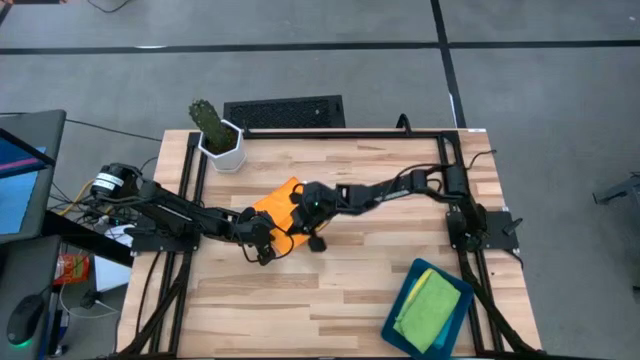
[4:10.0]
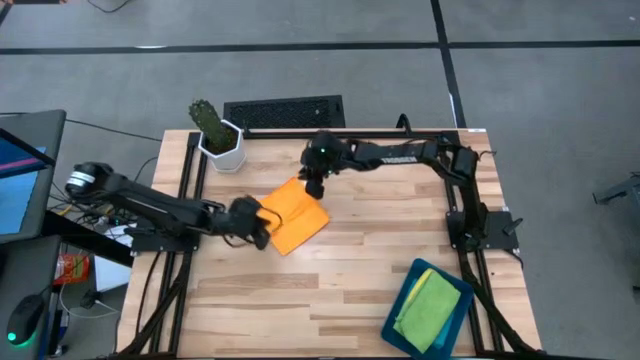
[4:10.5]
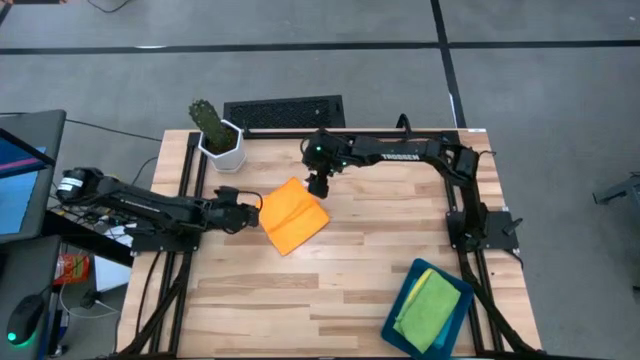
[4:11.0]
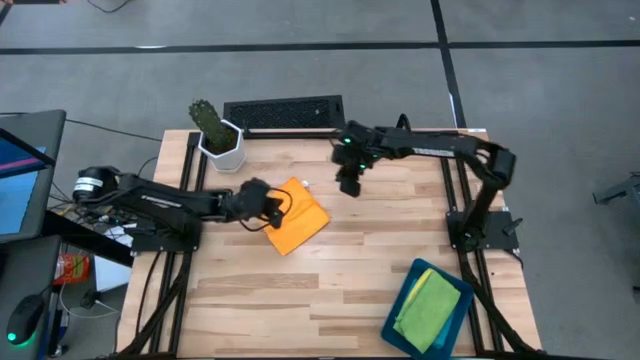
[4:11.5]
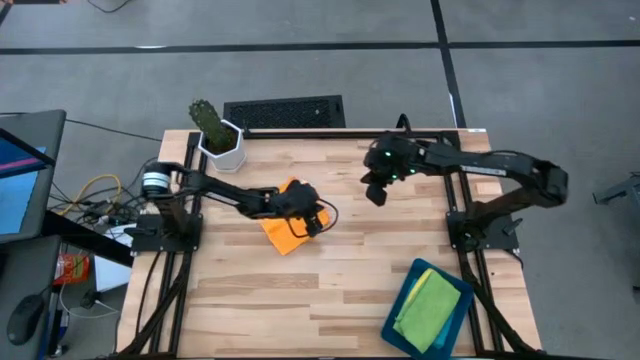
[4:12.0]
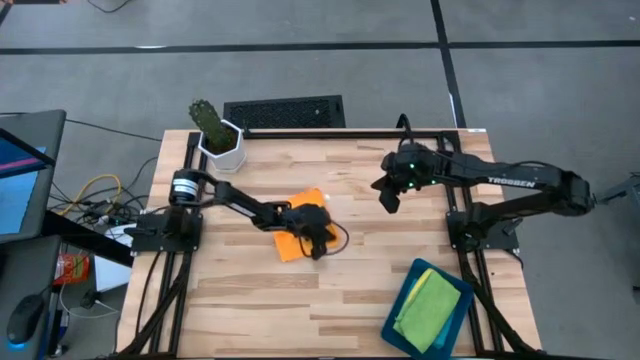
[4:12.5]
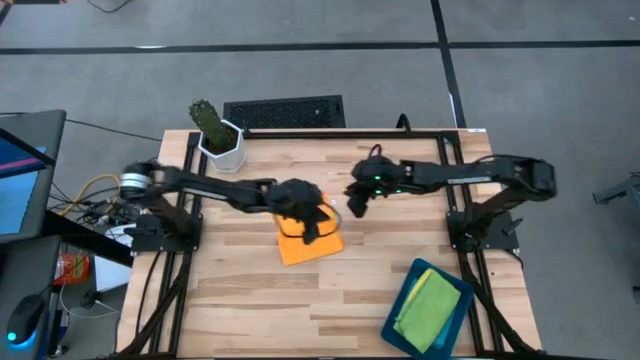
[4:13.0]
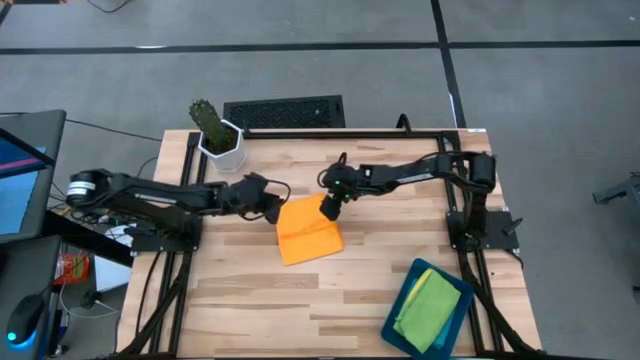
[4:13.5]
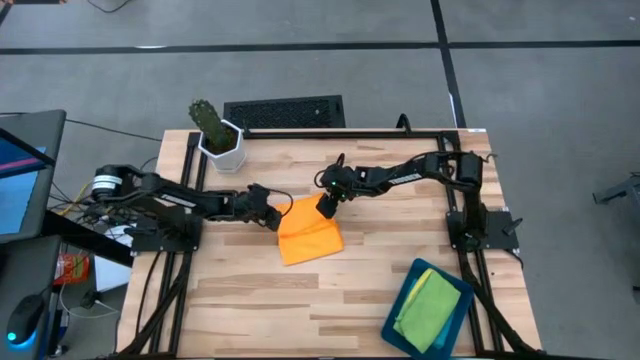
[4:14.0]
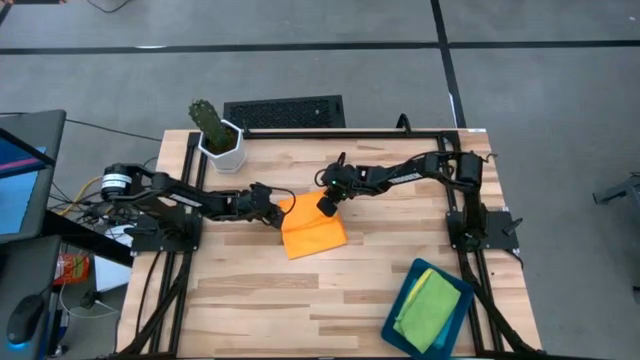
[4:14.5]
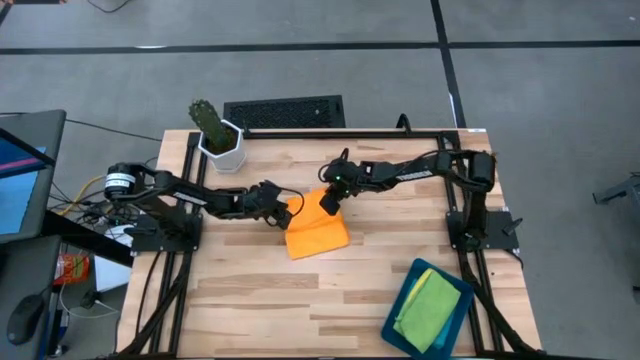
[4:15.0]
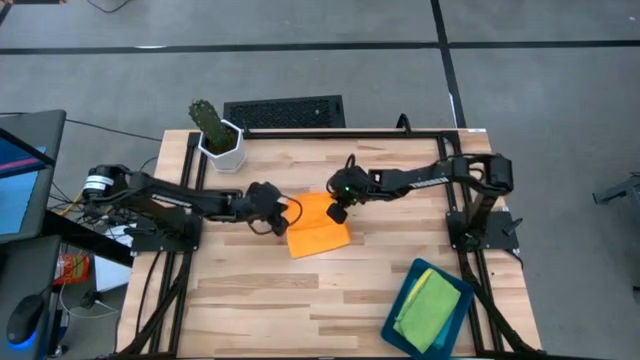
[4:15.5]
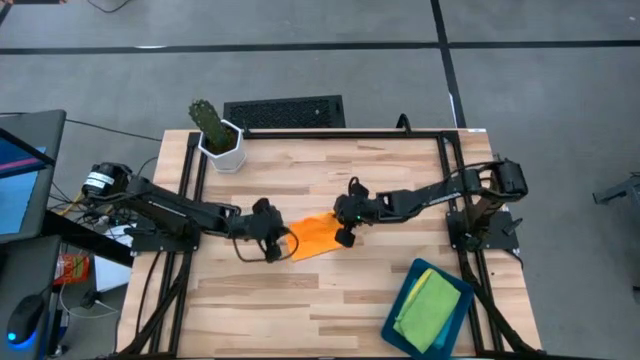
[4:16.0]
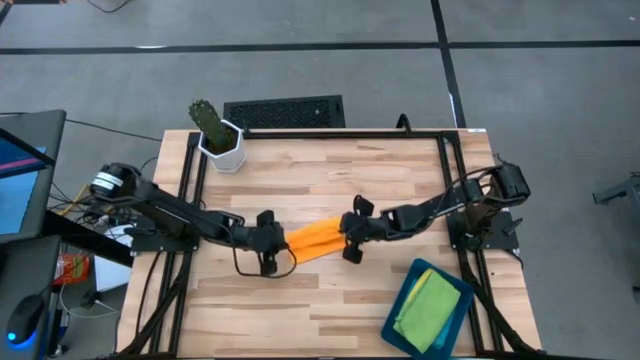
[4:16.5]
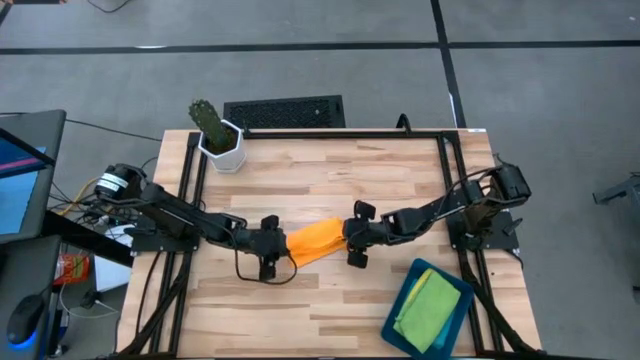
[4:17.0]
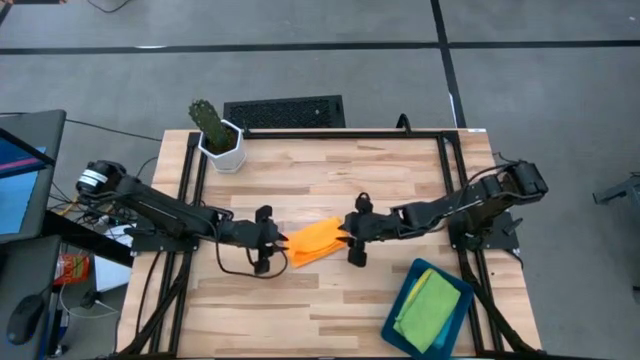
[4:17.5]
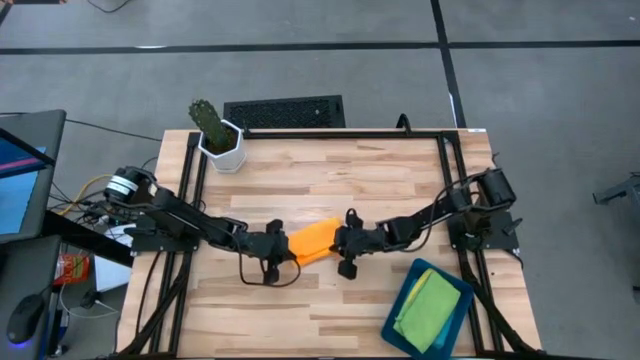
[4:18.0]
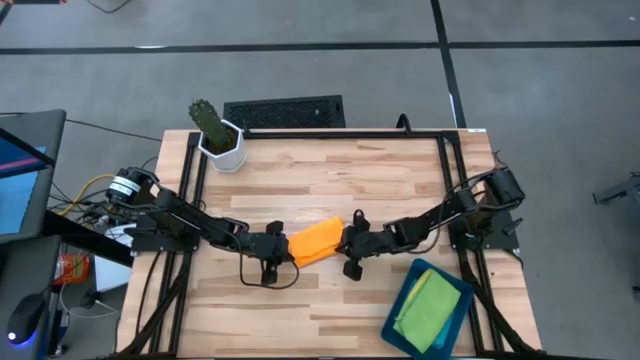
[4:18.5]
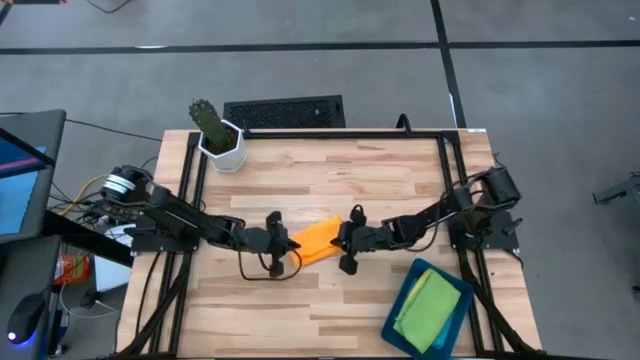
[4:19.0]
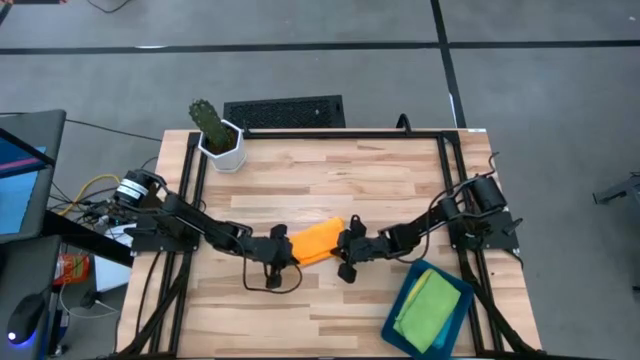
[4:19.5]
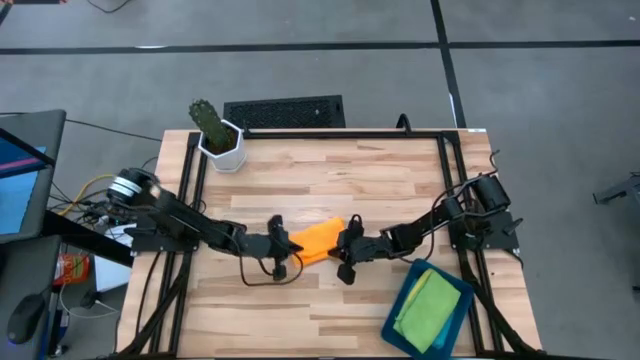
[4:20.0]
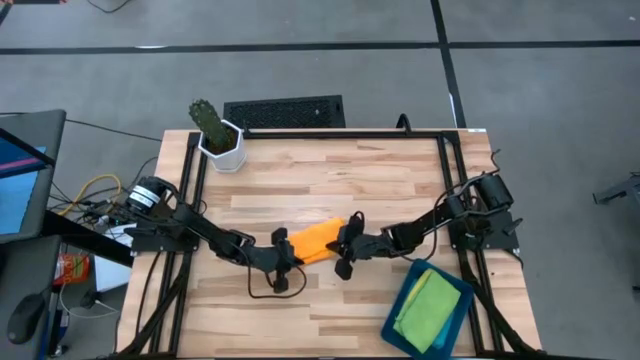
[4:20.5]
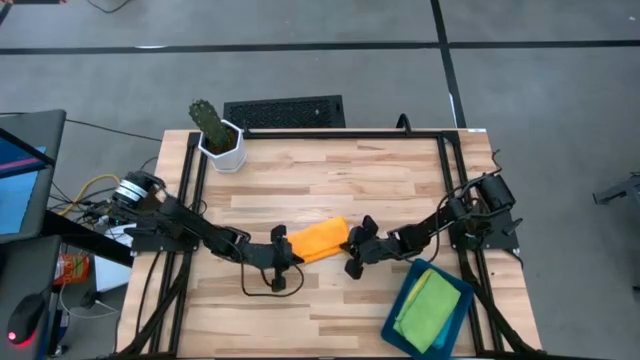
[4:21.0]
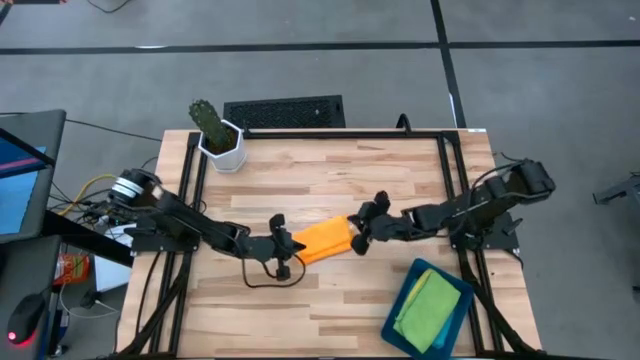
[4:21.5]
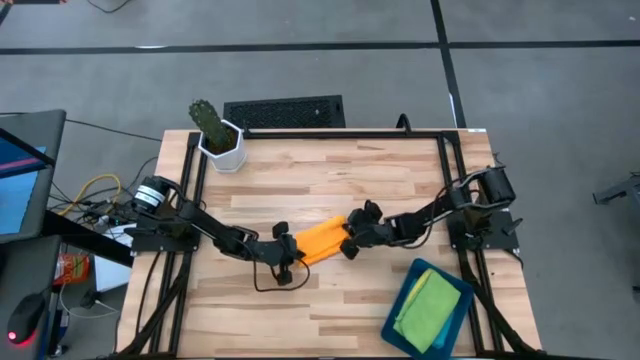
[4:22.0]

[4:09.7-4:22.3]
Task: Fold microfiber towels
Fold the orange microfiber towel

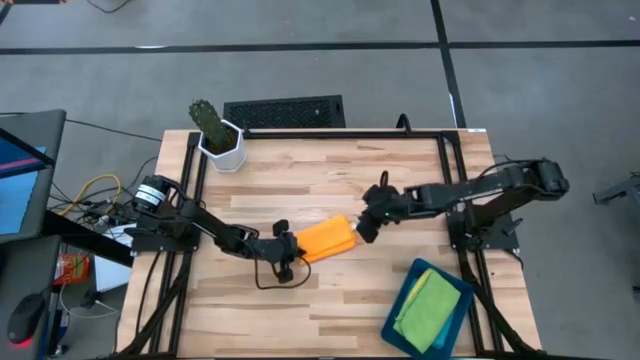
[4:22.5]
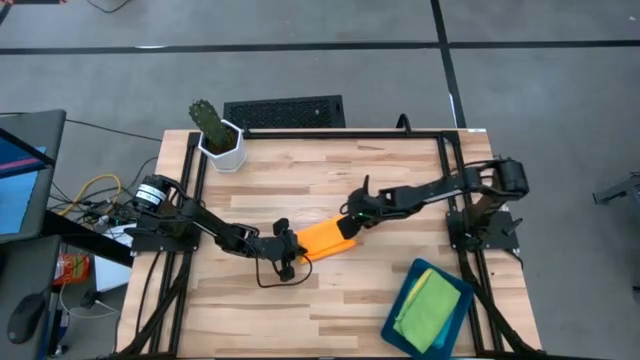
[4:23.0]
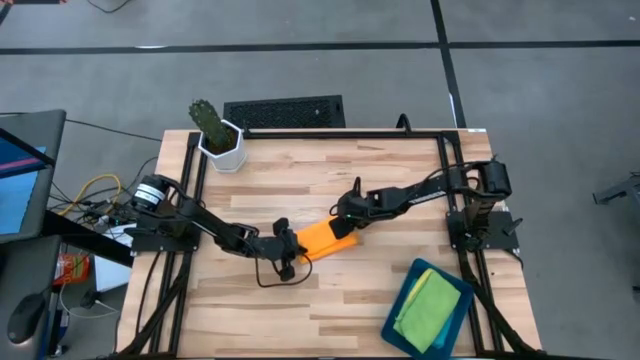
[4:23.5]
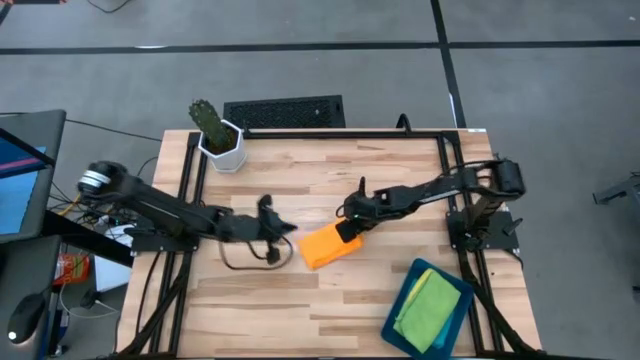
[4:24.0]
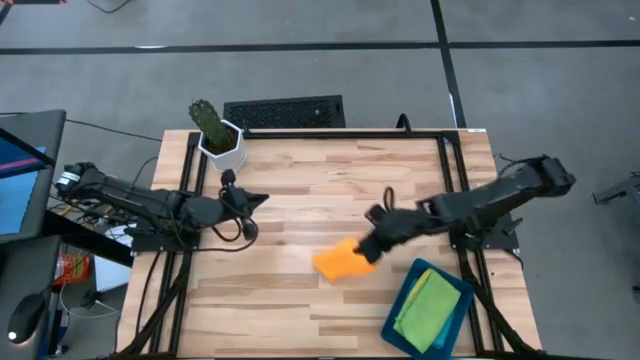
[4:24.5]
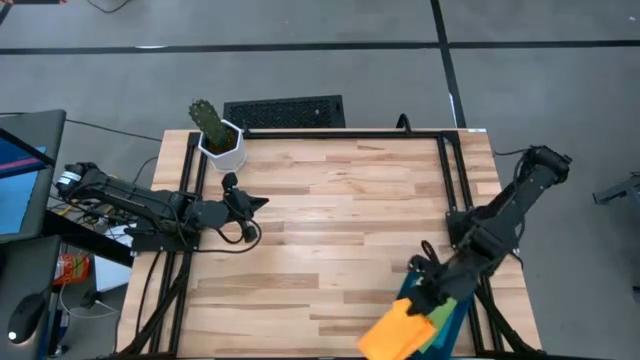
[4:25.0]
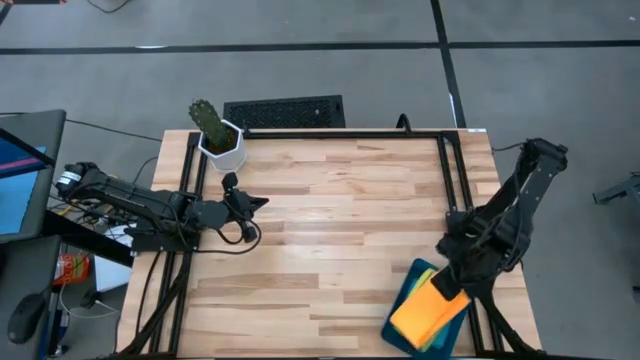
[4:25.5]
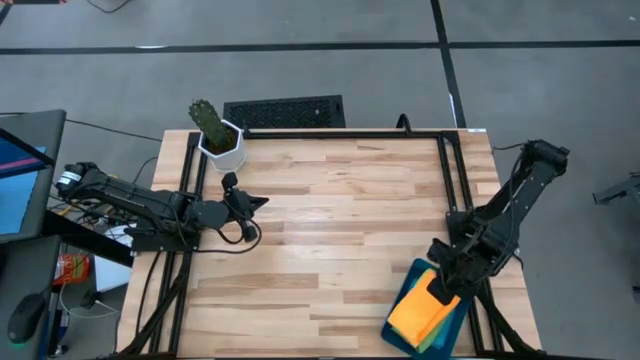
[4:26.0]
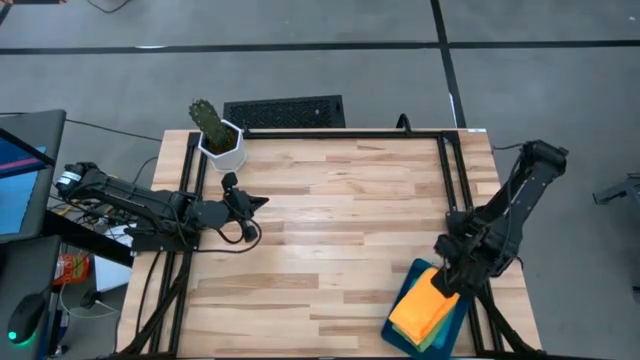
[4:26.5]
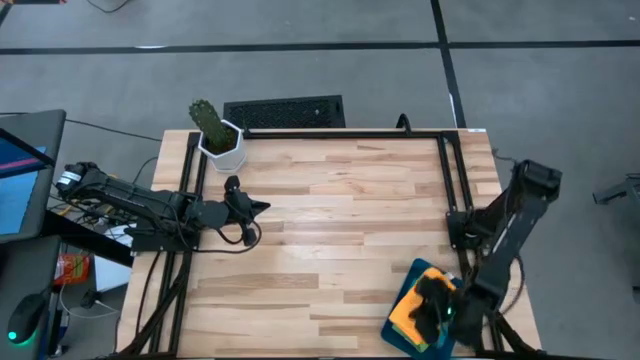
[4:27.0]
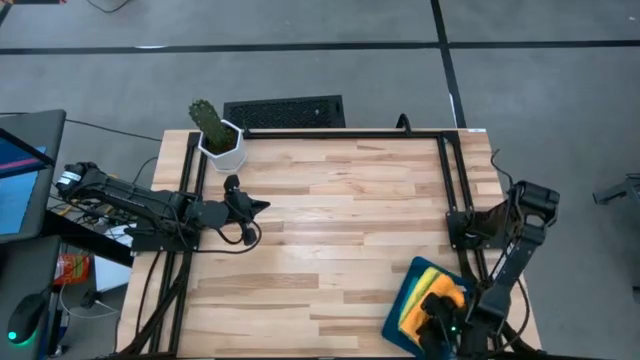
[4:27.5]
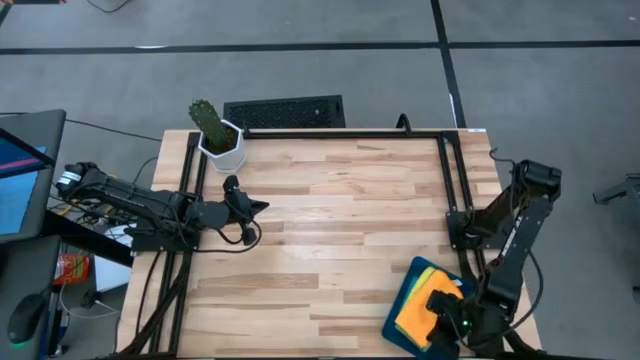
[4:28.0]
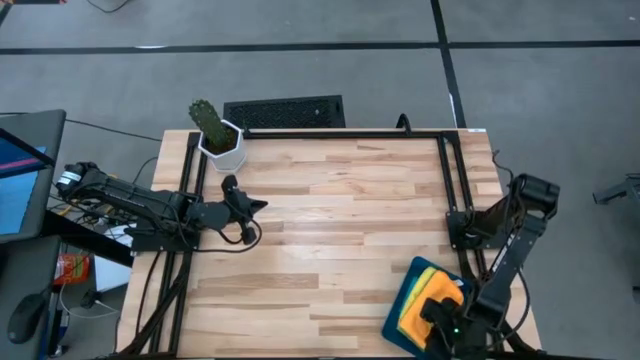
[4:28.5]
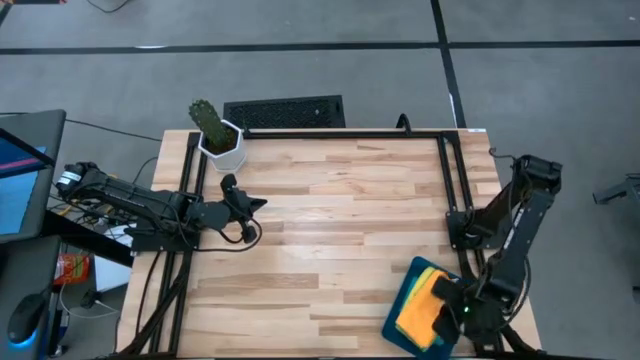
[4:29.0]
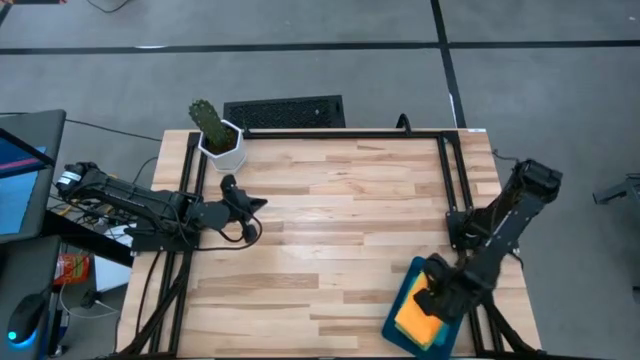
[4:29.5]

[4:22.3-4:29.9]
Put the folded orange microfiber towel into the blue bin

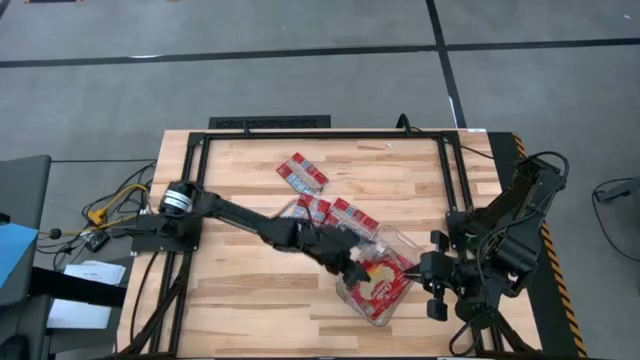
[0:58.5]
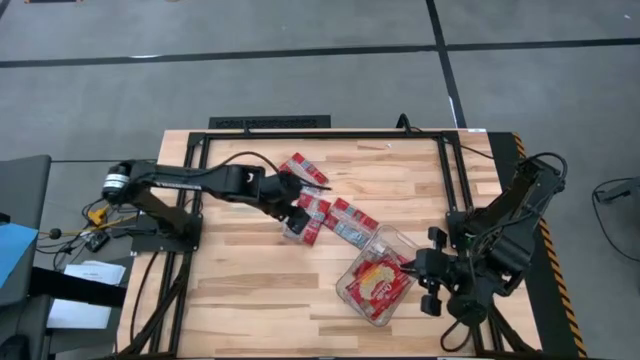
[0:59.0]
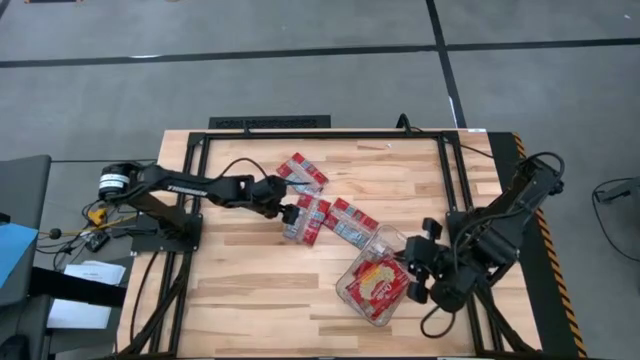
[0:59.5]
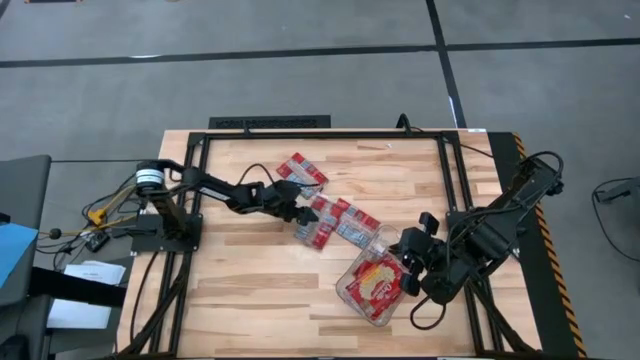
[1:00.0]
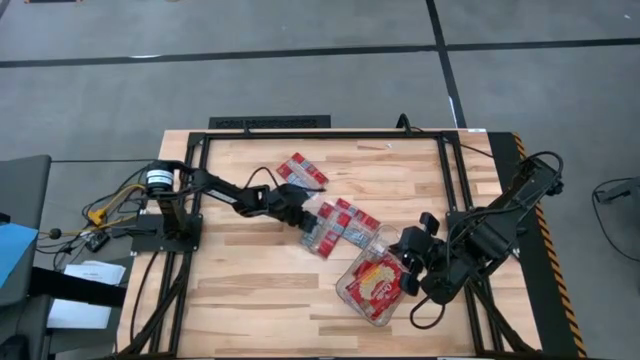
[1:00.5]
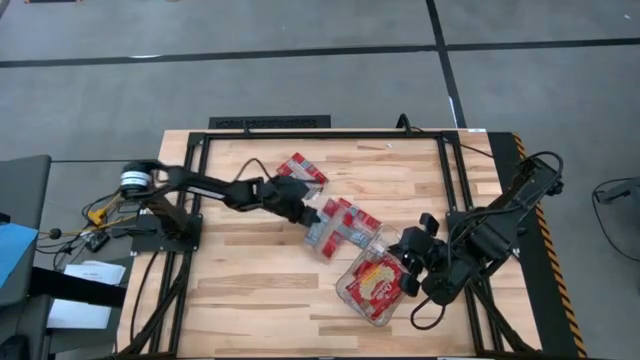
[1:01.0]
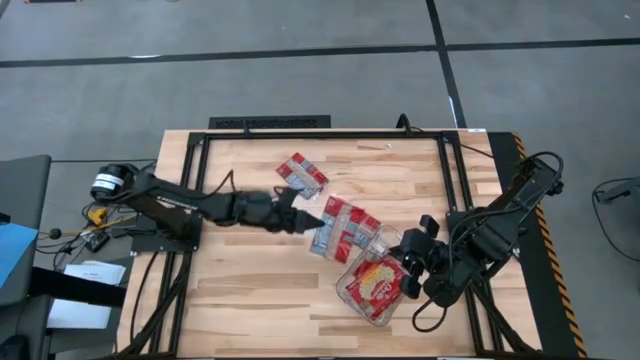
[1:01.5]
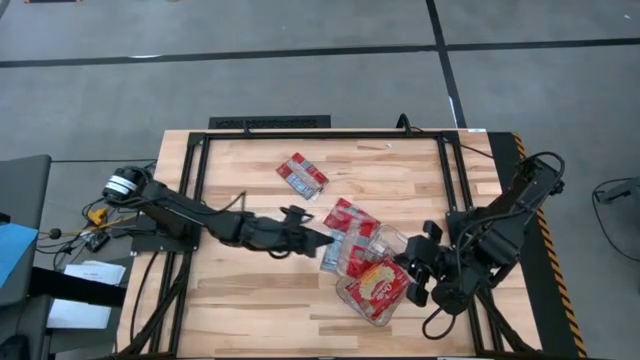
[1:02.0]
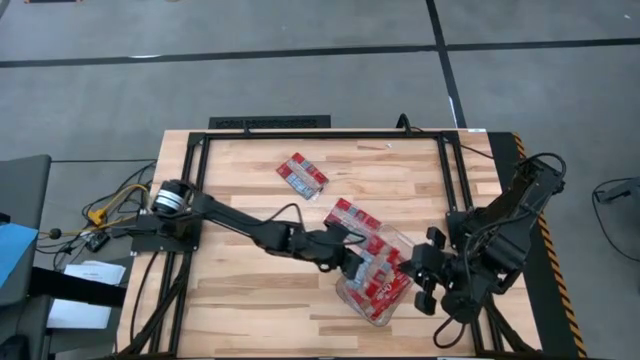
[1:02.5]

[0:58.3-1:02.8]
Task: Sort popcorn bags into baskets
Put the red popcorn bag into the transparent bin
